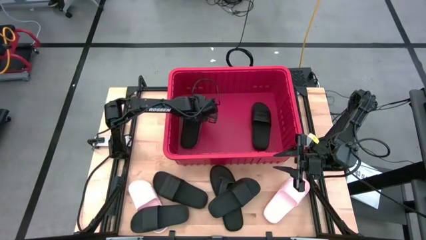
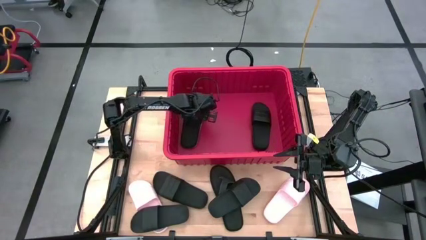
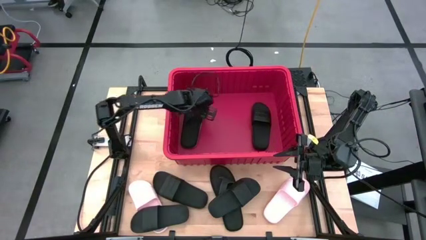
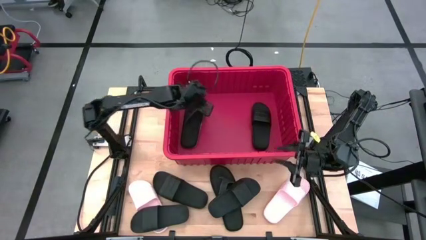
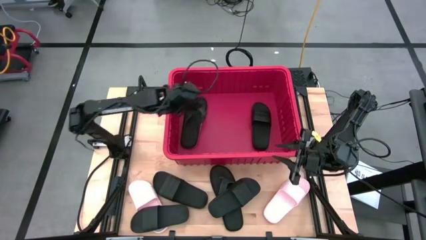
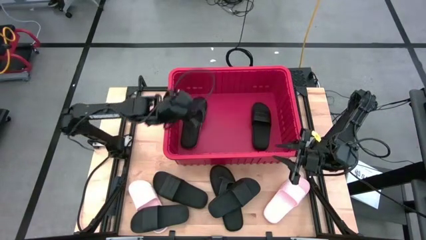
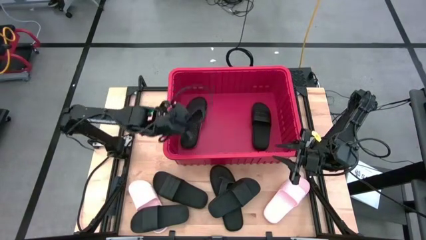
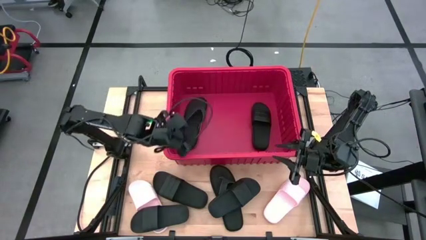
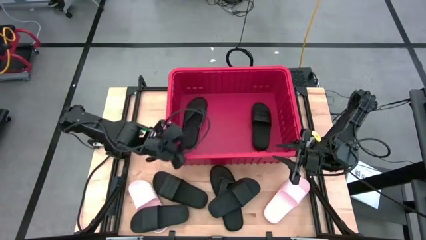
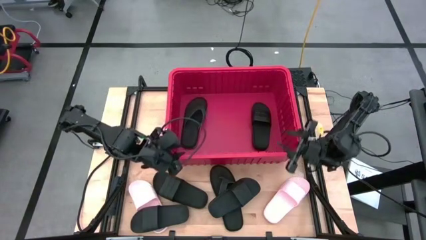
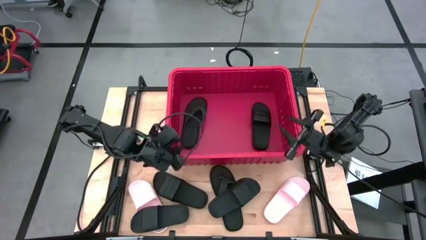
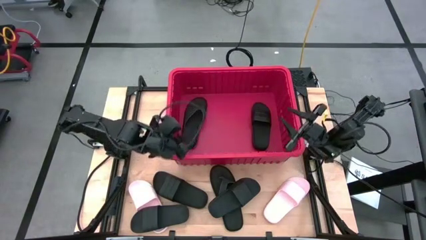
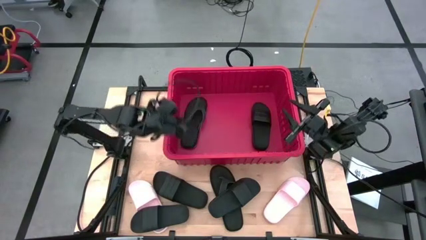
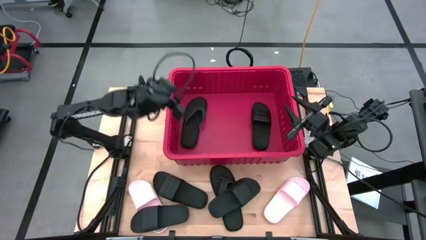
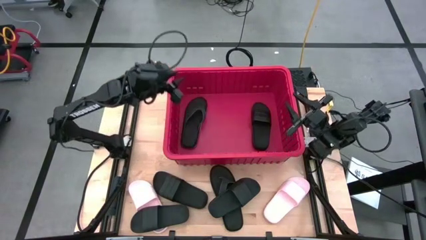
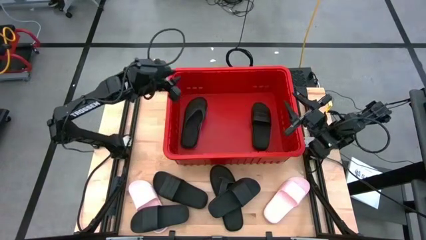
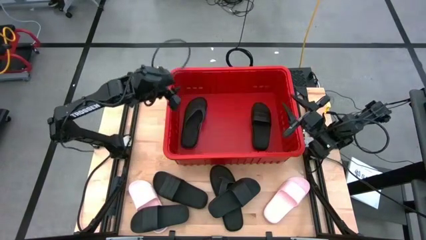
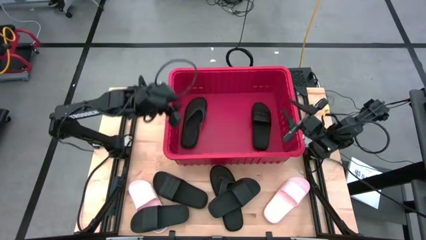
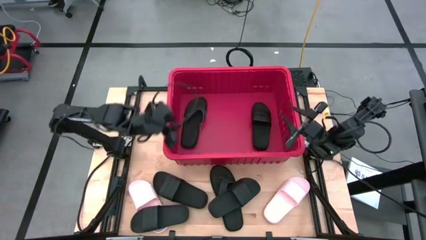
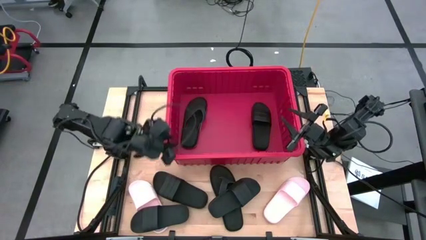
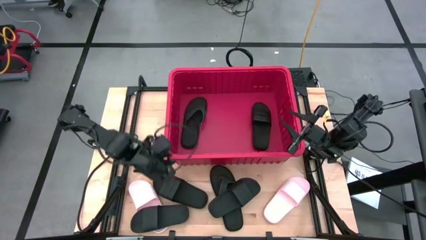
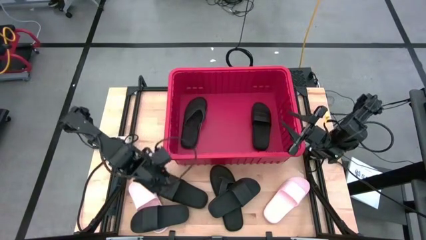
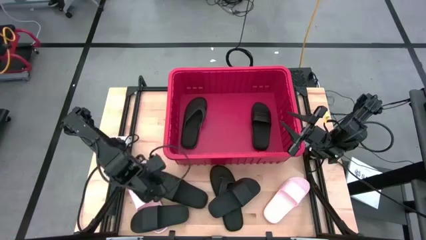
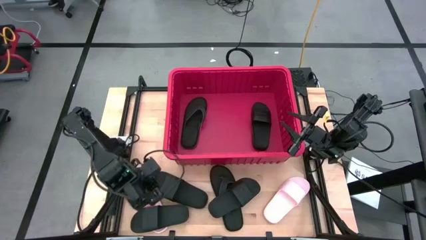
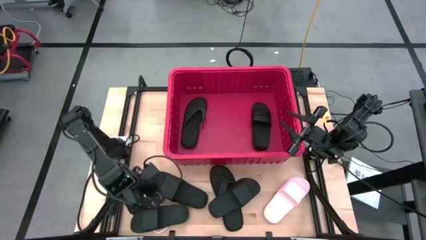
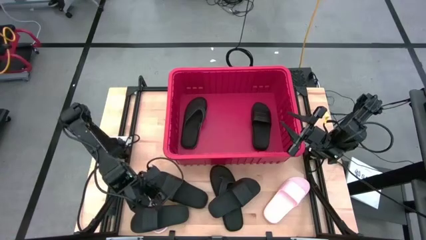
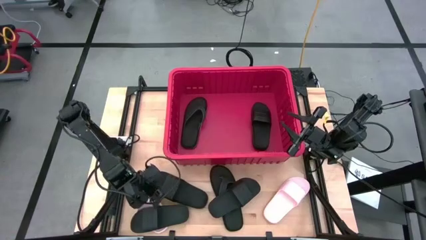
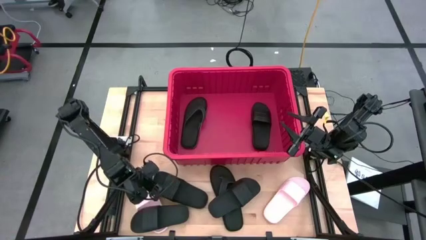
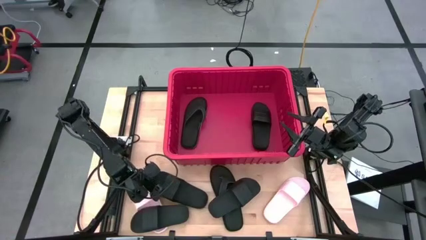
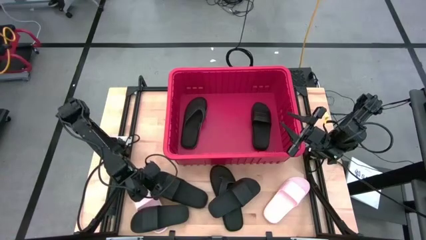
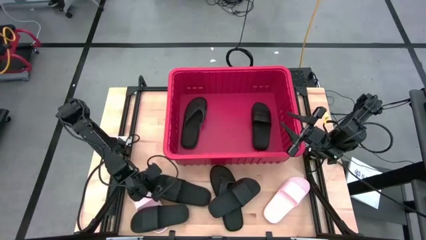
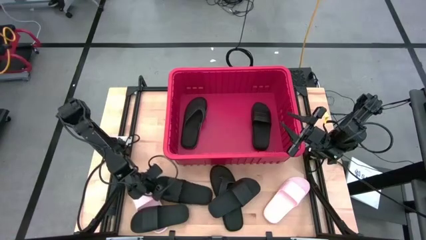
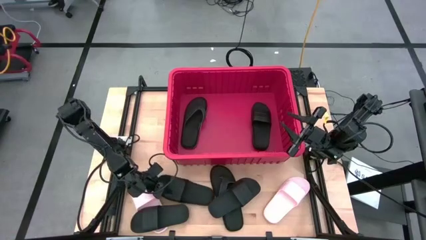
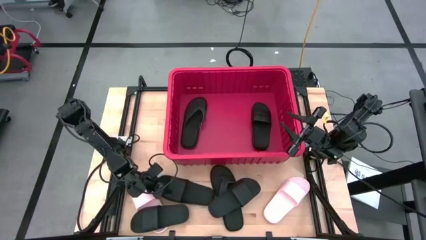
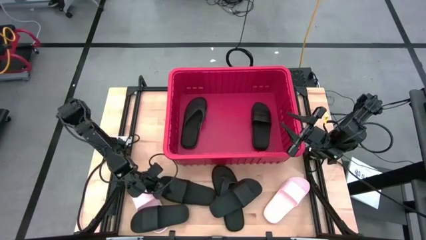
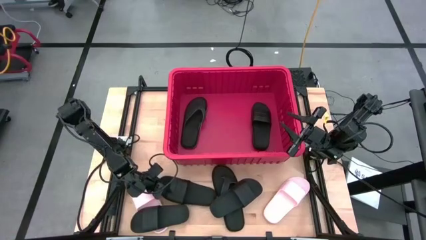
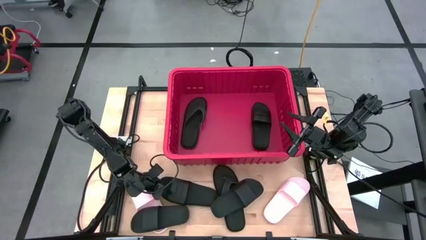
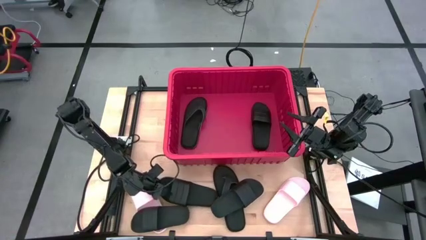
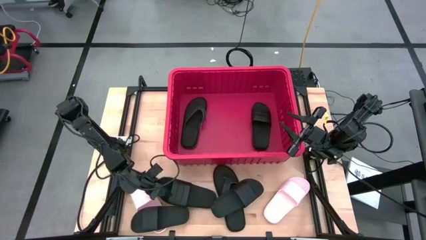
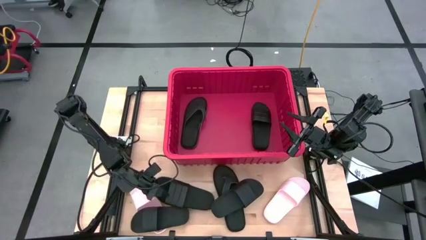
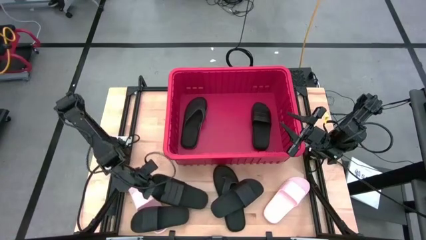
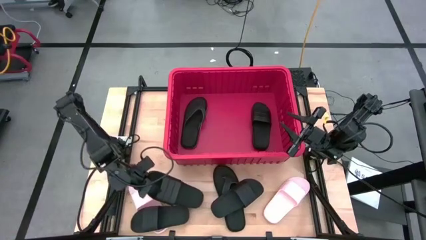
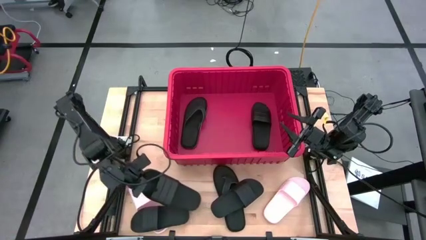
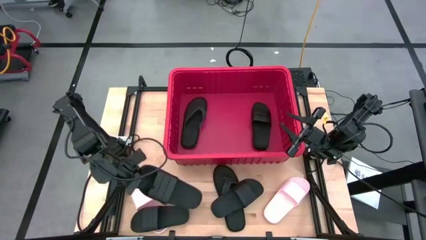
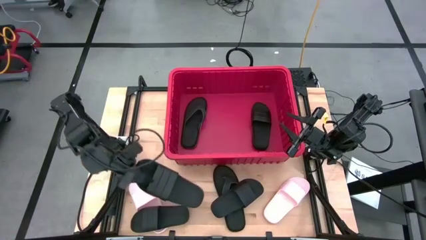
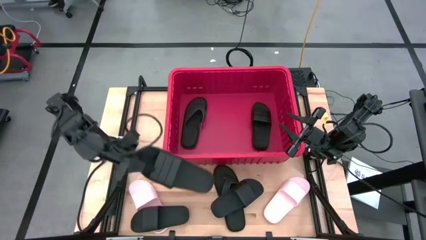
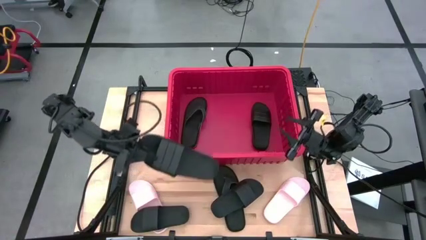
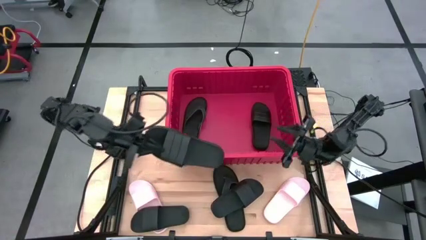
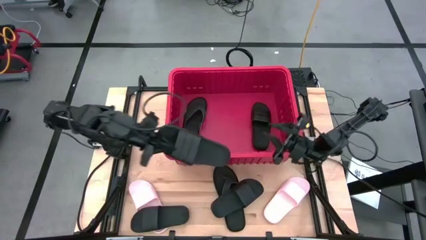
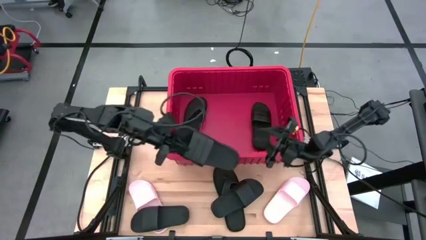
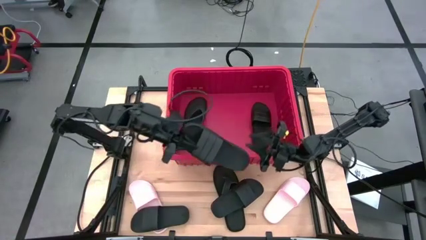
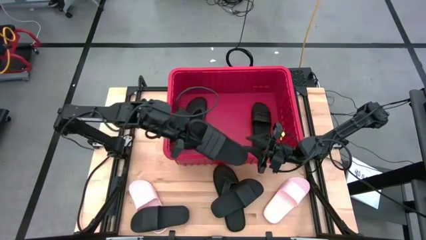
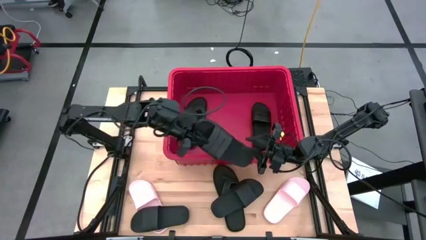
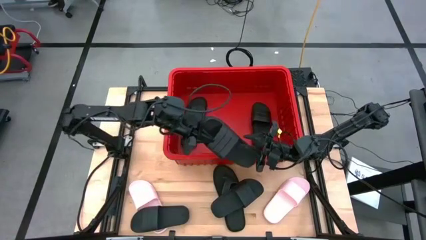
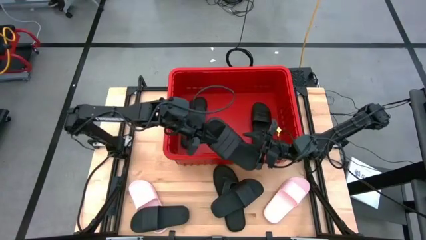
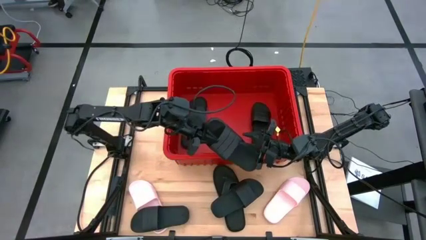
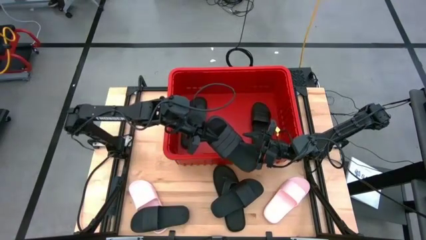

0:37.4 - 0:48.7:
Task: Pick and place slides into bin
Put the black slide into the red bin

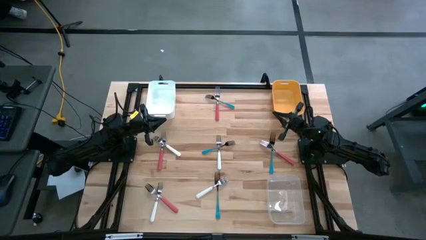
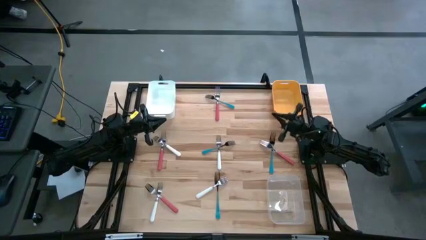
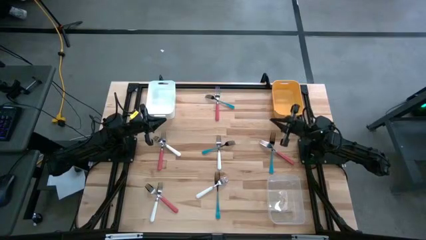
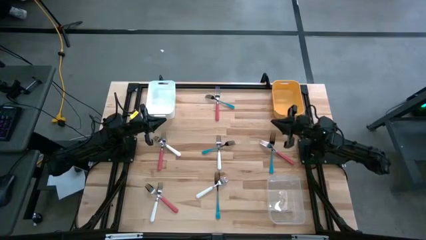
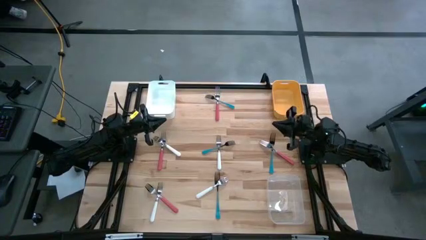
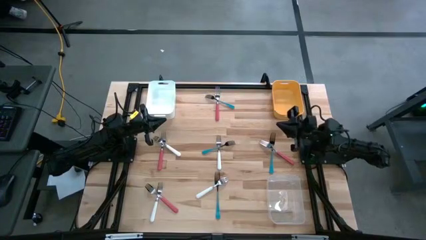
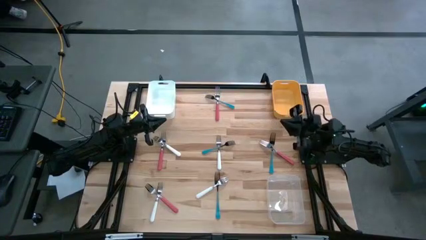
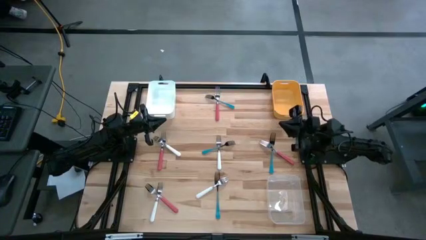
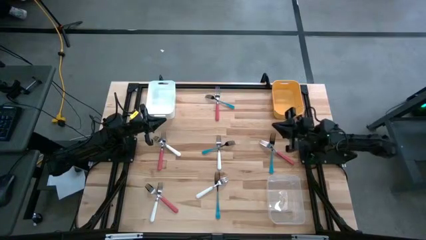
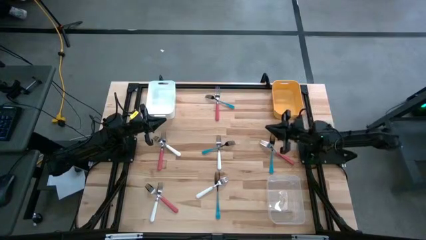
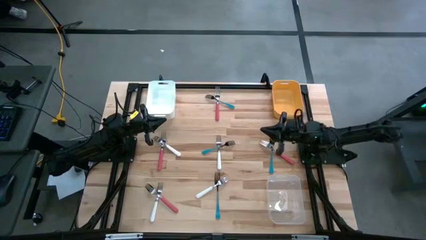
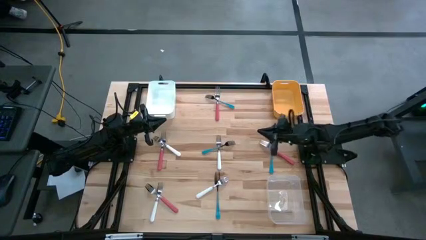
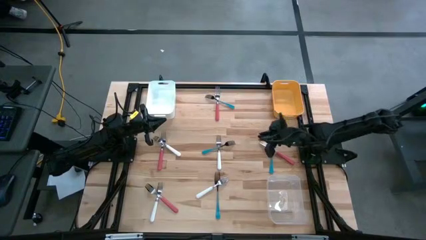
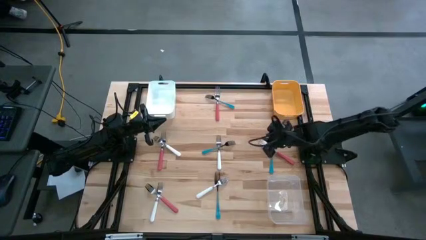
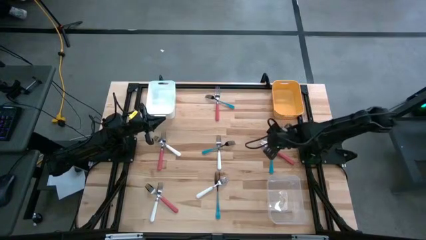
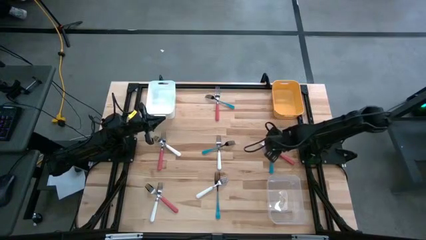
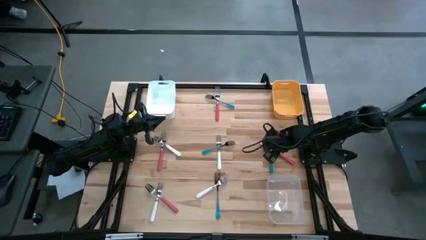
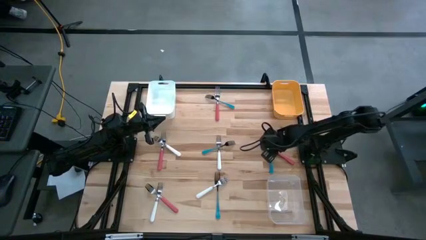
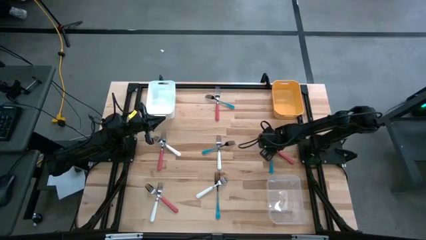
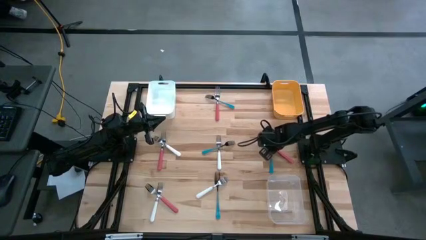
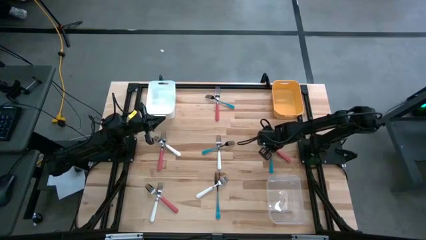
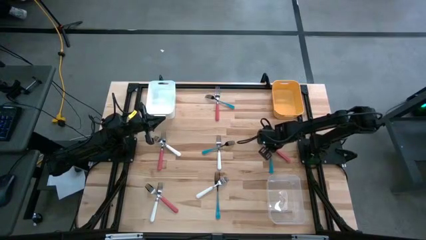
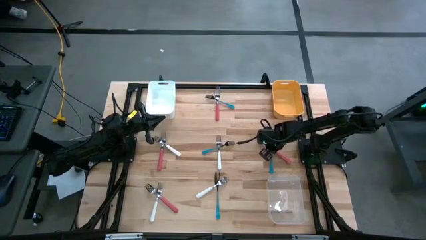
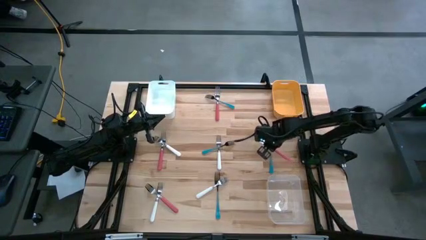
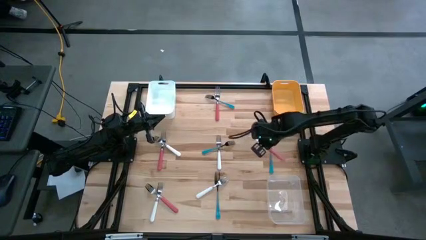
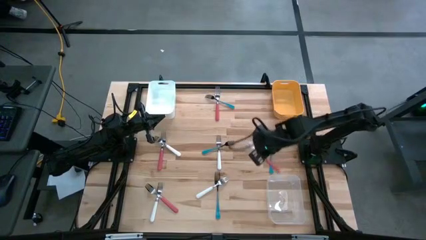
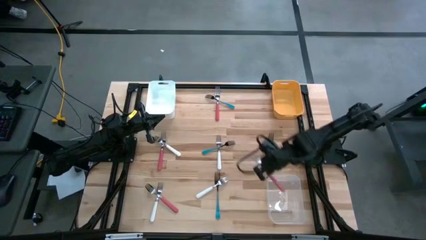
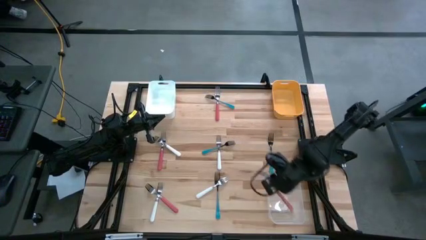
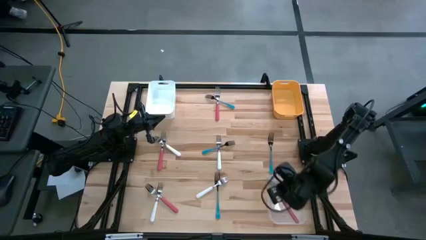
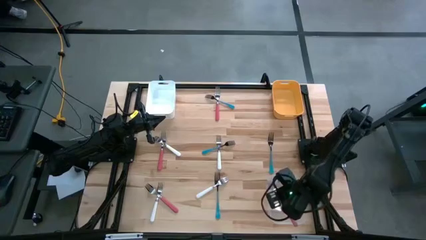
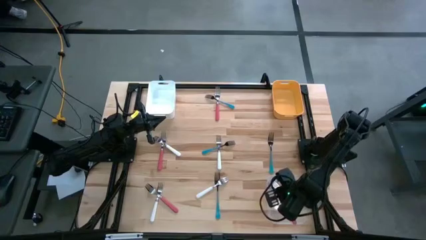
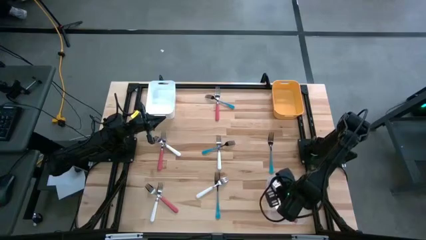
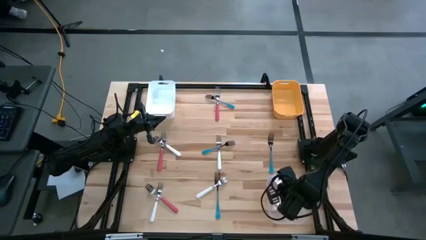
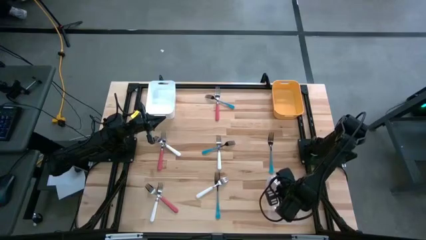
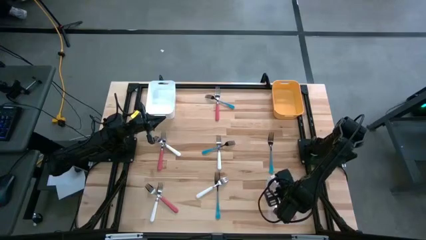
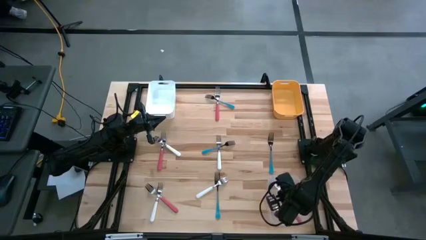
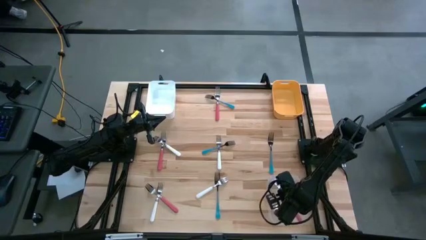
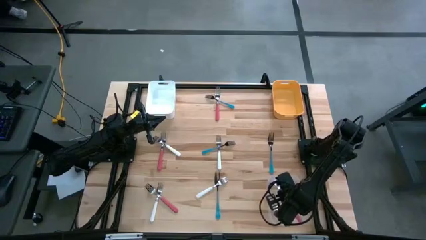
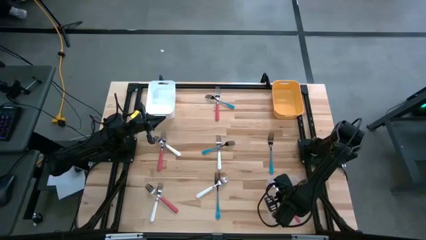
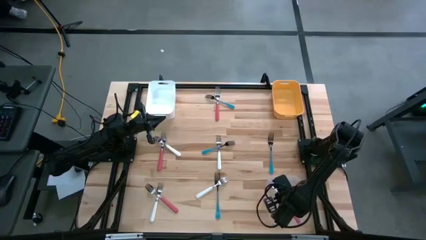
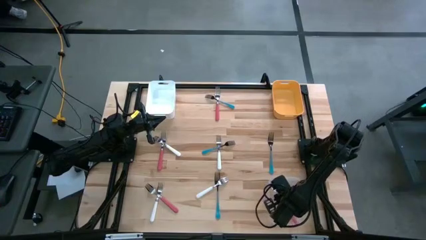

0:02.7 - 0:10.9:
Task: Sort silverware by color (type)
Put the middle right light red fork into the transparent bin
